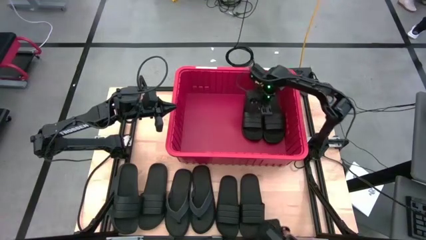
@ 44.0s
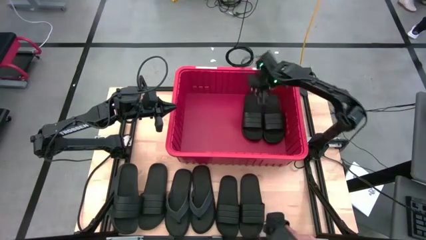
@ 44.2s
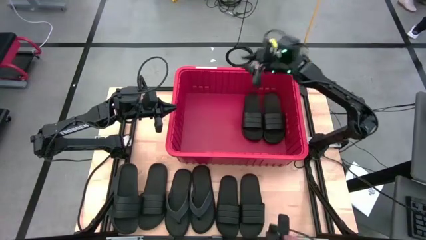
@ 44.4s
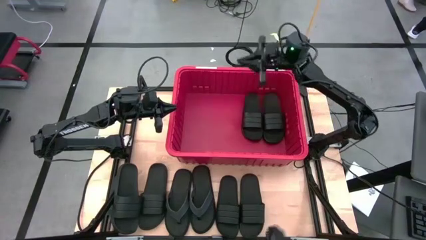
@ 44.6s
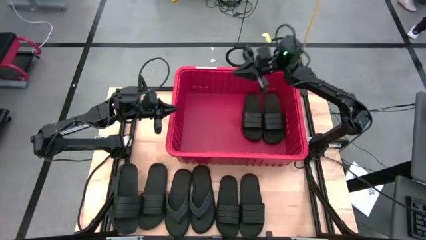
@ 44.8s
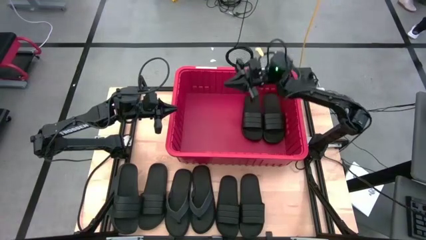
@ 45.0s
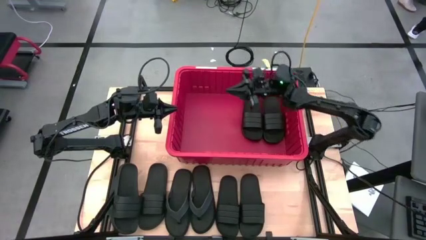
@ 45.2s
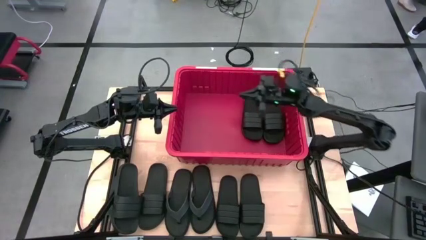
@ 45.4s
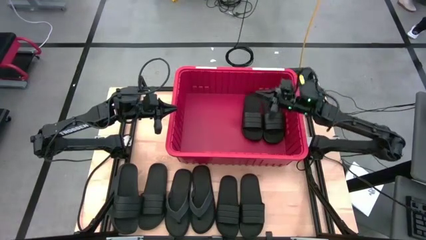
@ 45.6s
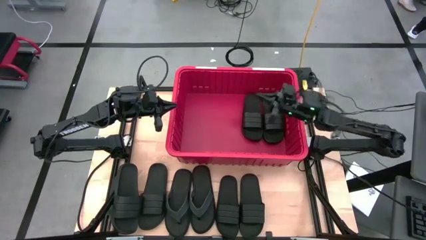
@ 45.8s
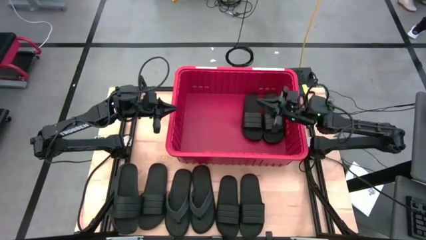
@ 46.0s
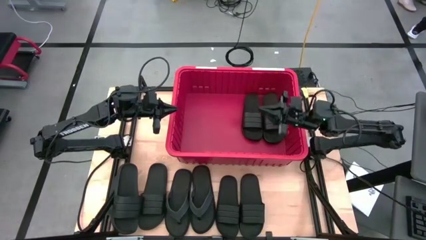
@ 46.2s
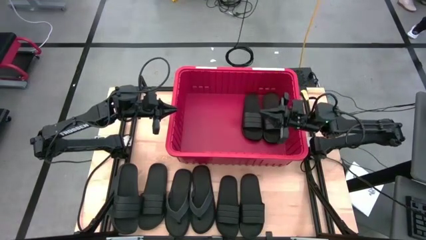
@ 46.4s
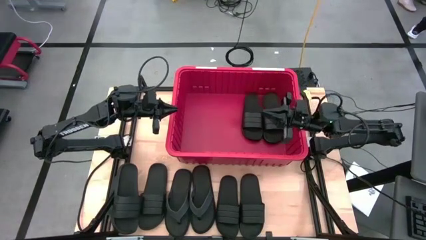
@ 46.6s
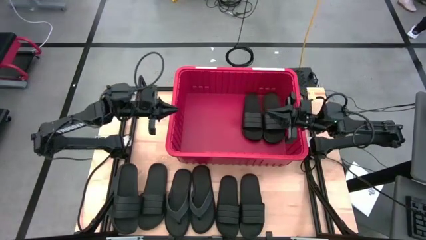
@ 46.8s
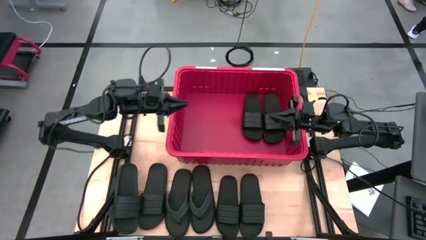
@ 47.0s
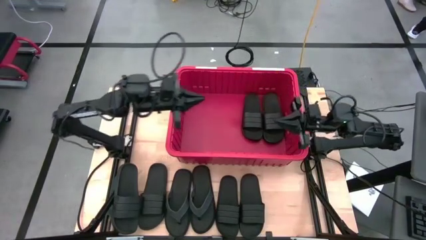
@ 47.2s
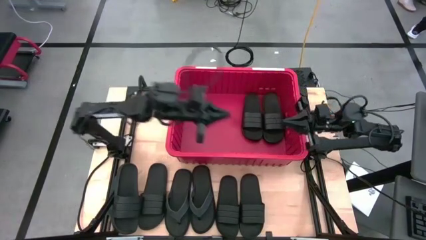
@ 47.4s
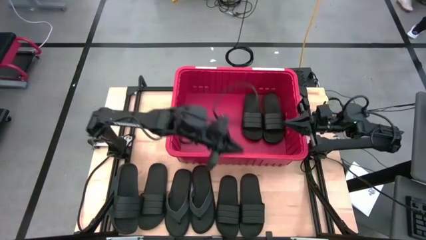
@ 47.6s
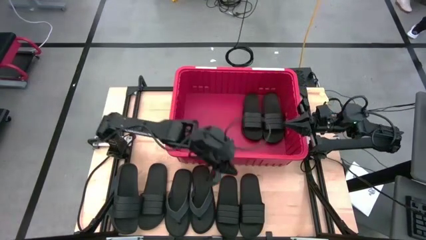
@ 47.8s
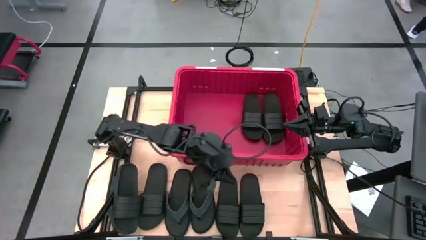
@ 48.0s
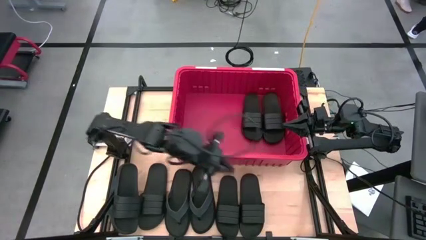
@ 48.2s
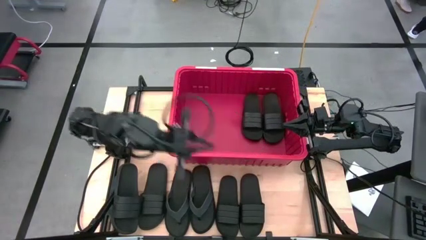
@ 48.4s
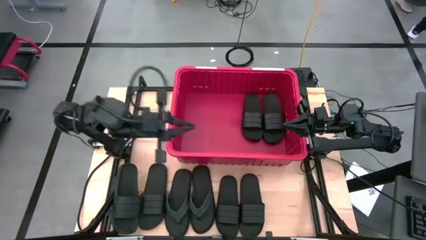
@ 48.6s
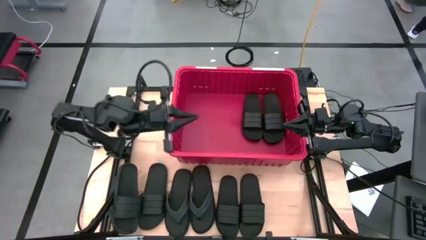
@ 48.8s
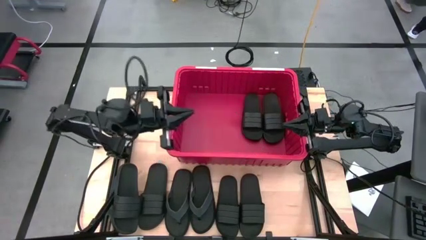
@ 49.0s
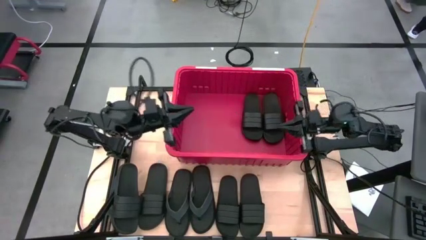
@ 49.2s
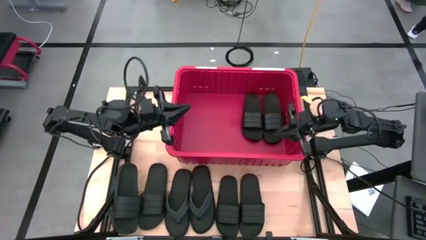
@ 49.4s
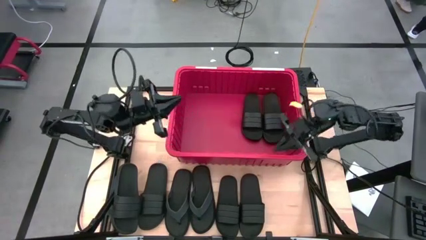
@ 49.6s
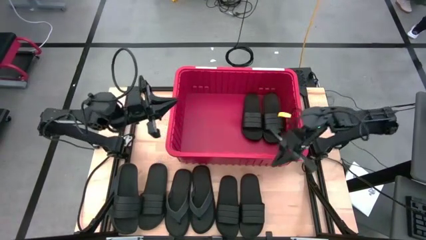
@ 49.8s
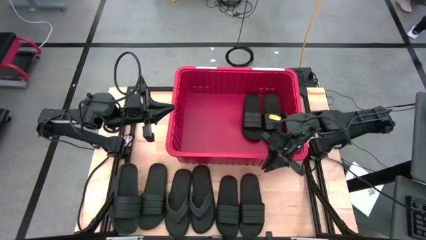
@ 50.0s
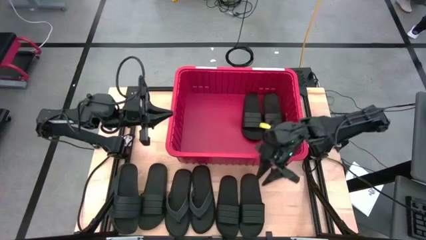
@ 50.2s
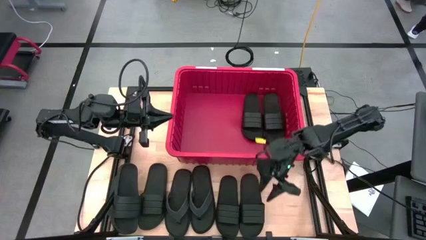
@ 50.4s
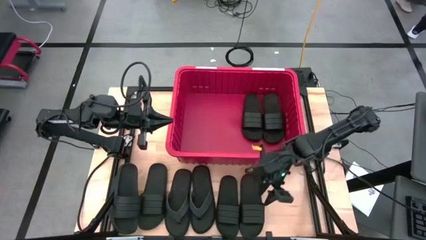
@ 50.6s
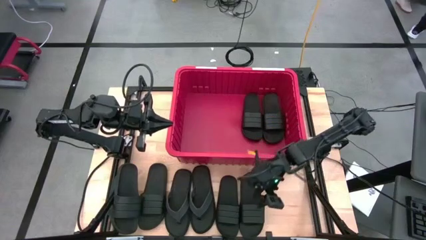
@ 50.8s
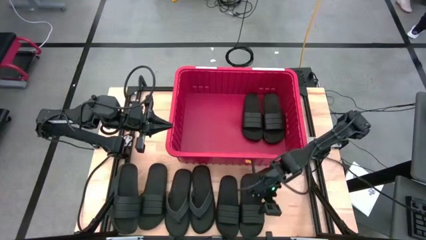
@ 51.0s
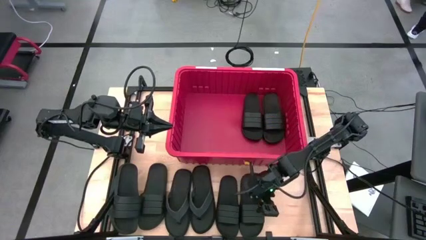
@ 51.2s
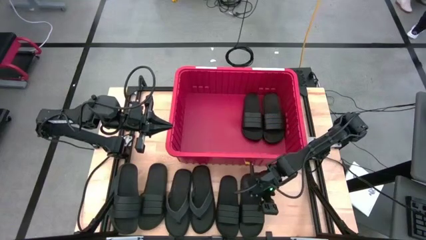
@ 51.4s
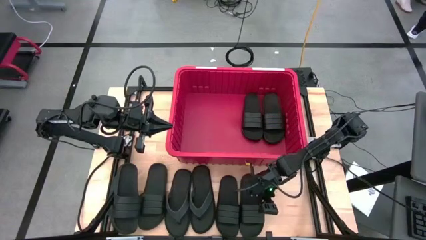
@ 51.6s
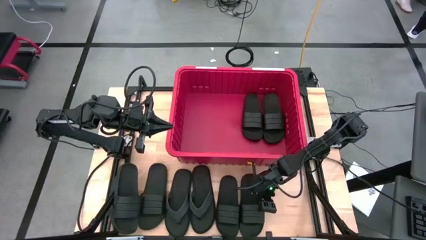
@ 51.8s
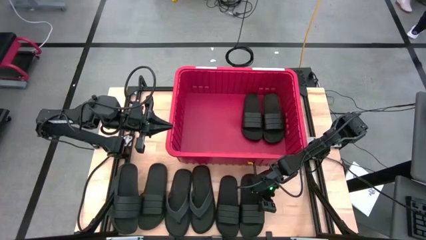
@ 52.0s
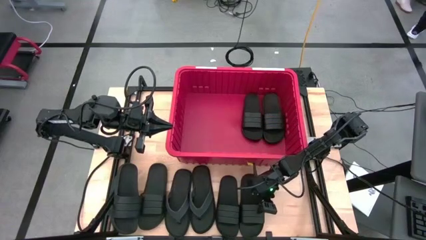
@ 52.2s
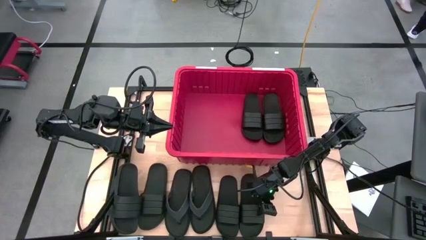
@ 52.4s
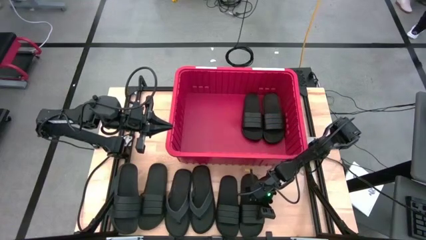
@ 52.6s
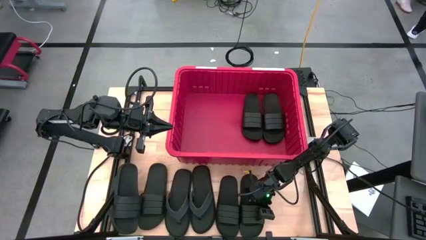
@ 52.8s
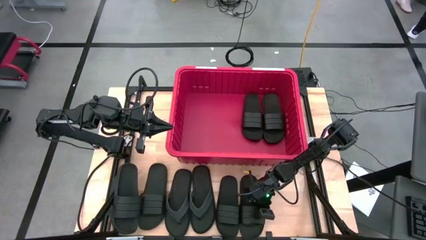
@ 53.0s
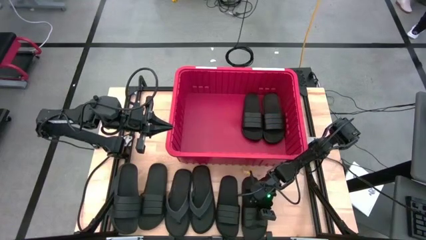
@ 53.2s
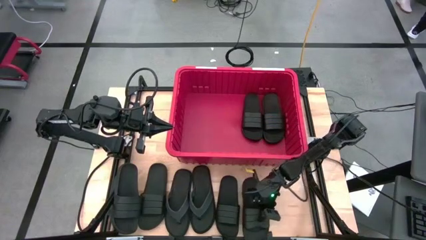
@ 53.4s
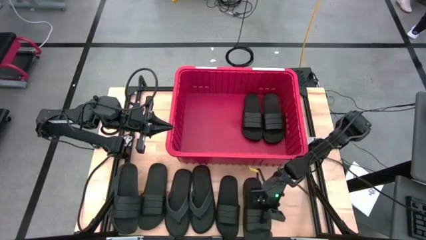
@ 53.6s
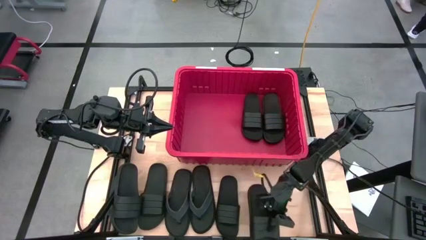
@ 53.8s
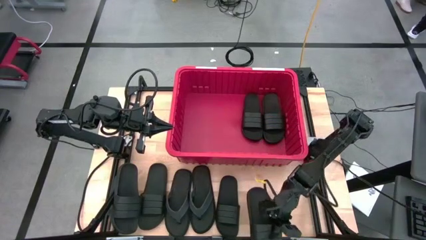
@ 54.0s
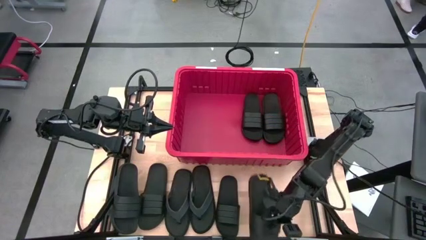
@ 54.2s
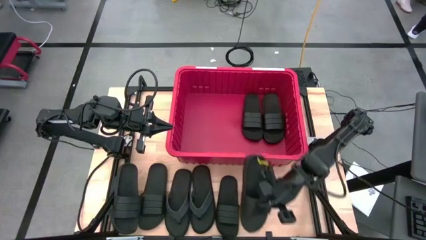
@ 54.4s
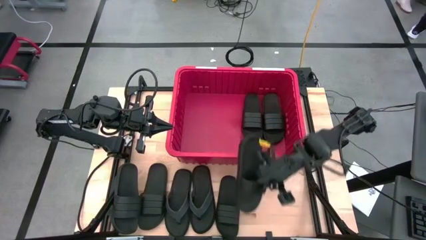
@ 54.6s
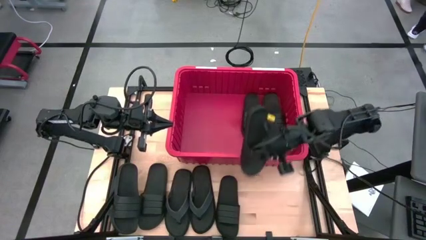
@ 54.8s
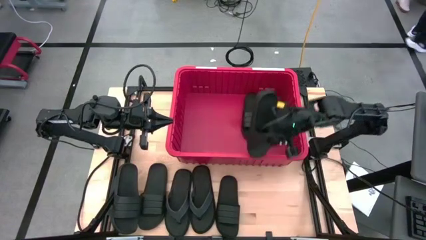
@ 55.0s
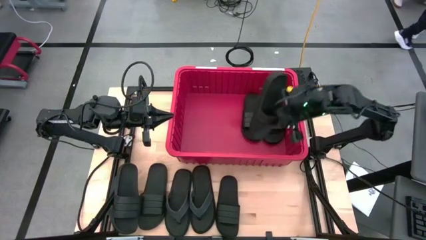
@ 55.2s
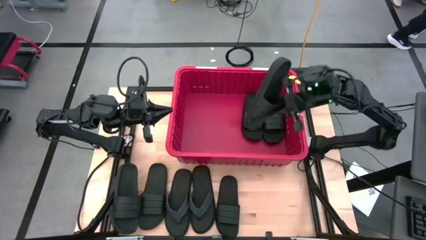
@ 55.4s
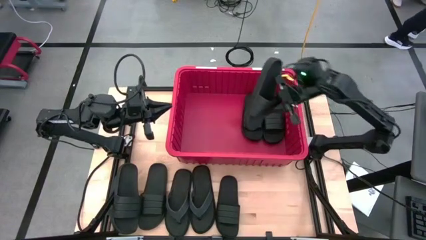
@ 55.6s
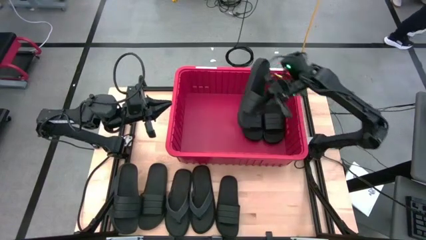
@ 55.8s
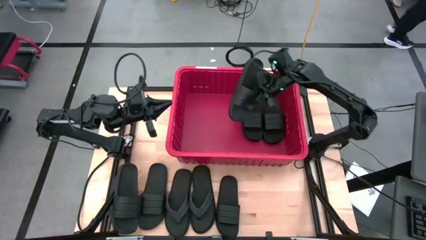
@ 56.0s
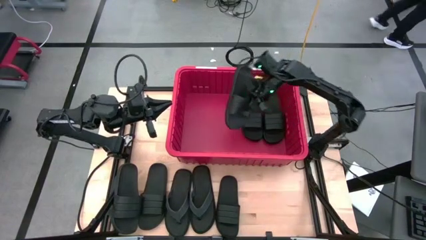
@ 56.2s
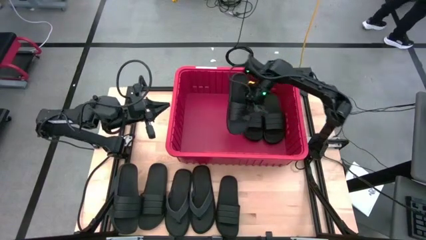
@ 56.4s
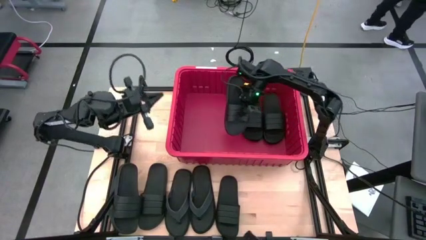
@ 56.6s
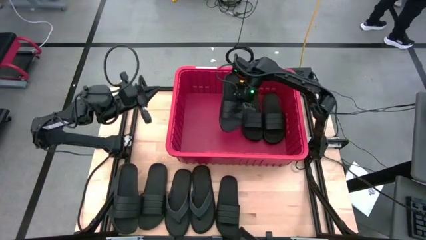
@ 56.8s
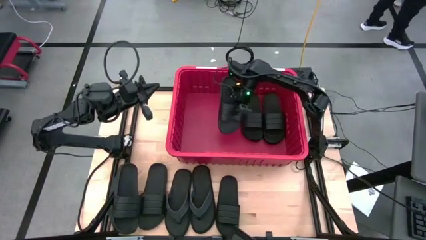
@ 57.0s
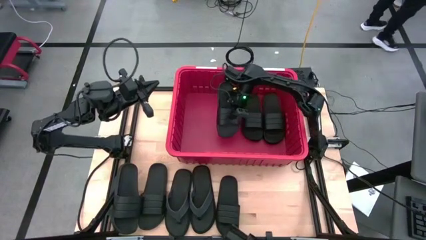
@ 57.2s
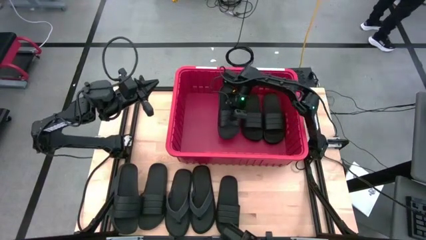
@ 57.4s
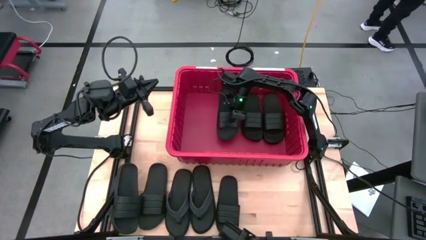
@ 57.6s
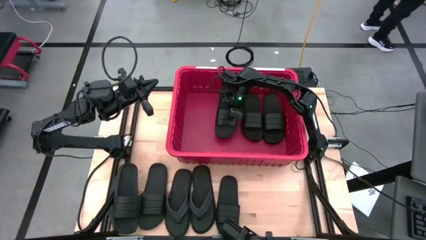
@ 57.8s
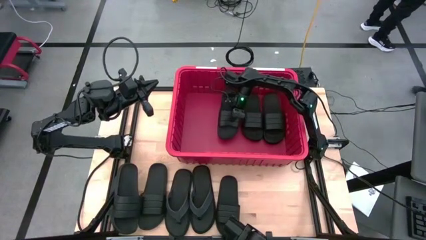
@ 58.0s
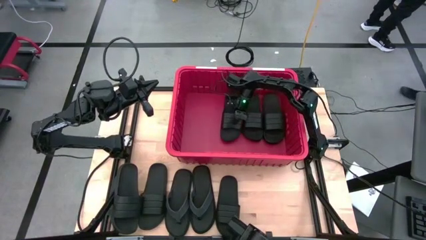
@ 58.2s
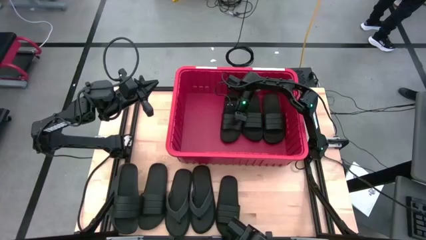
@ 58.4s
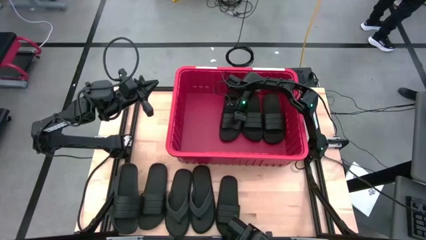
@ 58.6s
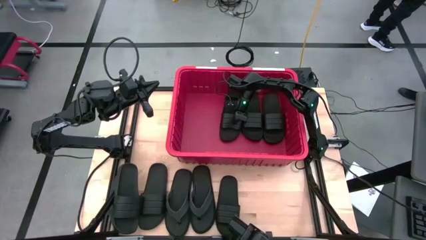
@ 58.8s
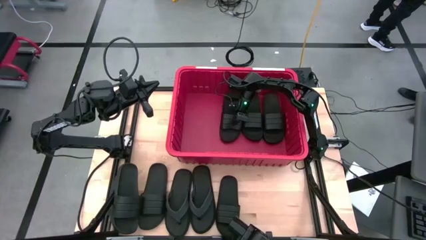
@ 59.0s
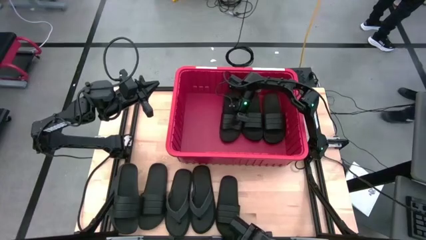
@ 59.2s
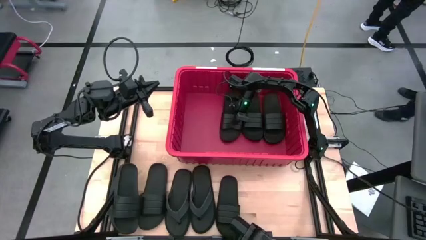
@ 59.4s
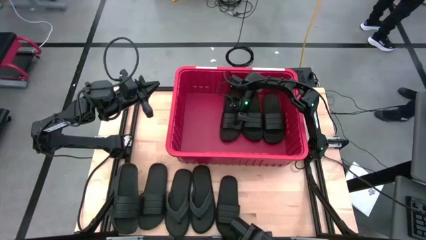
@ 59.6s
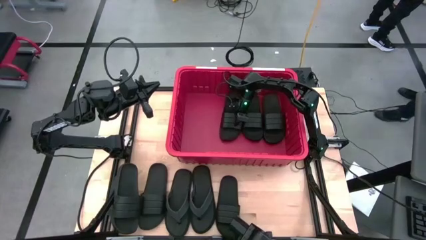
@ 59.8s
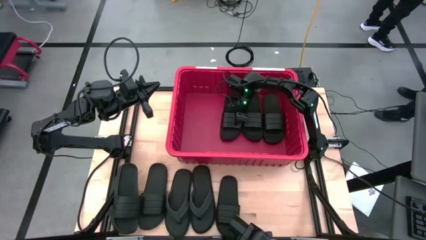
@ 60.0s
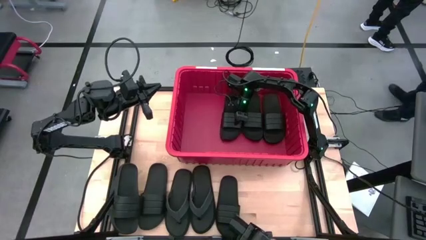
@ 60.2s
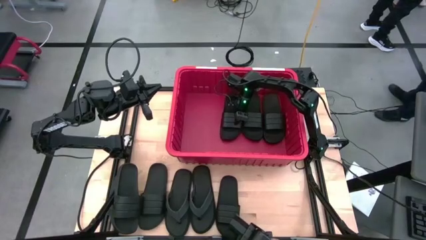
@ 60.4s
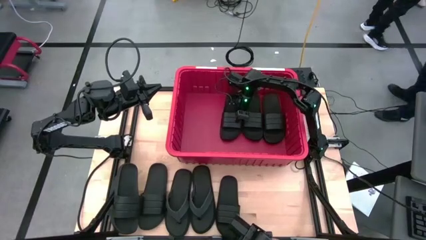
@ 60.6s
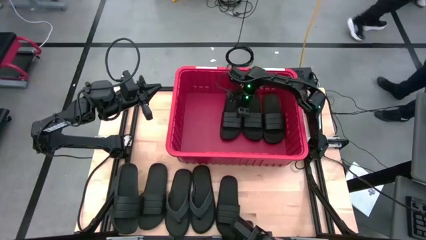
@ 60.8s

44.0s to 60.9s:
Task: Pick and place slides into bin
Put the slide into the bin
